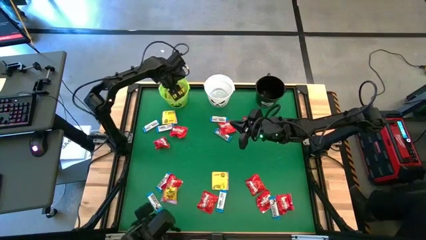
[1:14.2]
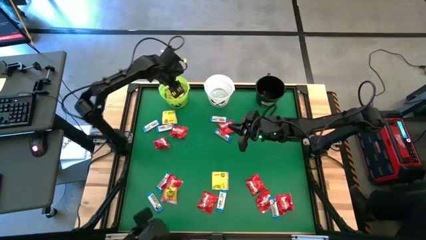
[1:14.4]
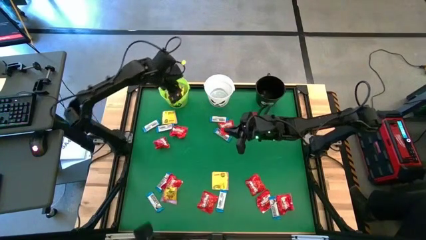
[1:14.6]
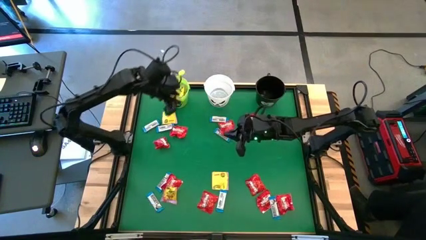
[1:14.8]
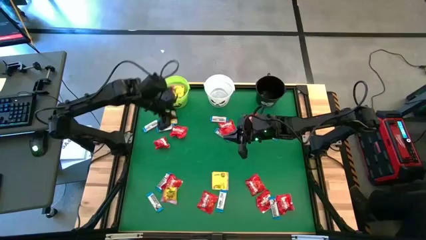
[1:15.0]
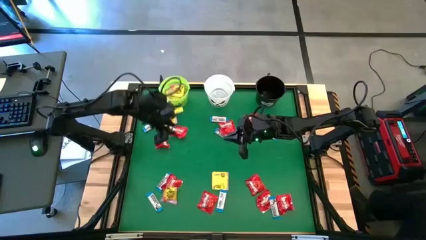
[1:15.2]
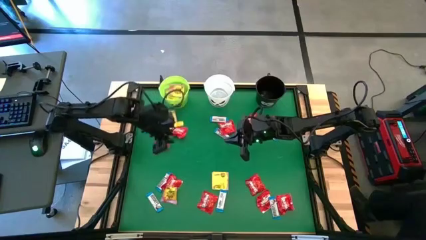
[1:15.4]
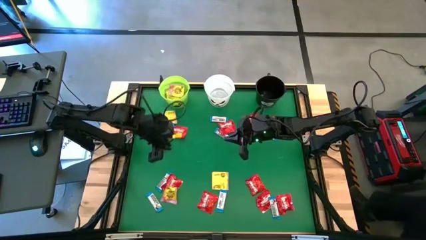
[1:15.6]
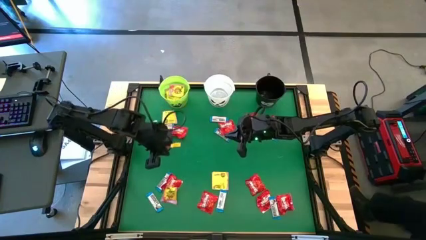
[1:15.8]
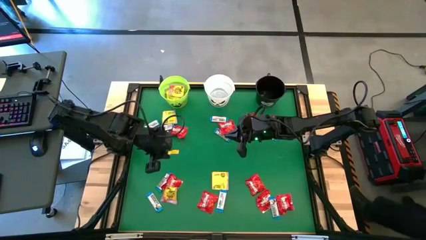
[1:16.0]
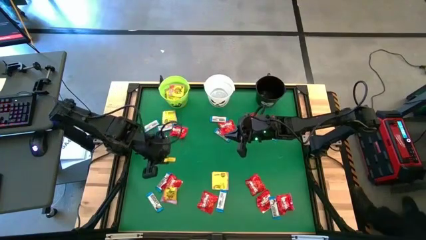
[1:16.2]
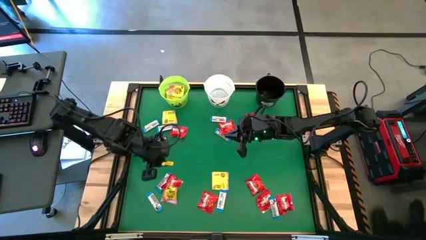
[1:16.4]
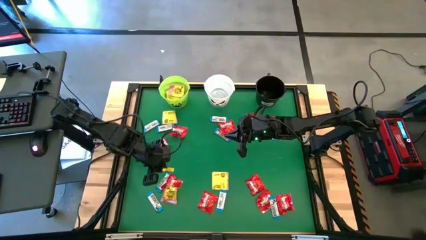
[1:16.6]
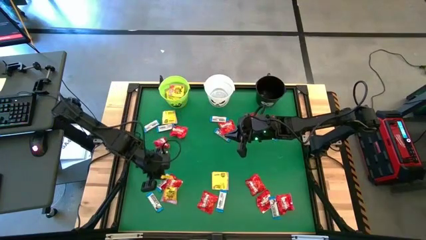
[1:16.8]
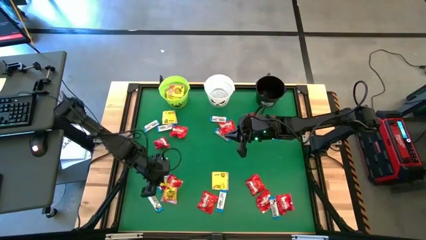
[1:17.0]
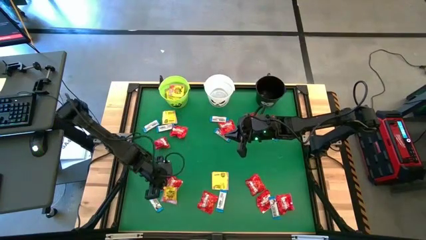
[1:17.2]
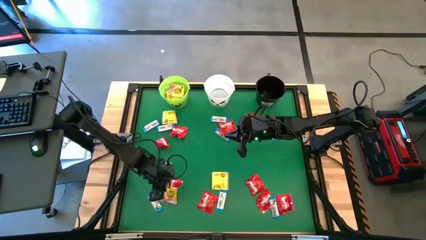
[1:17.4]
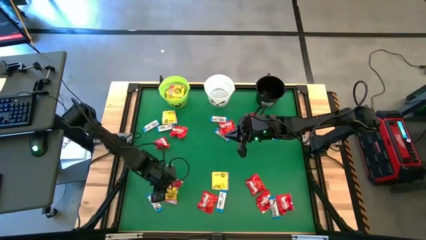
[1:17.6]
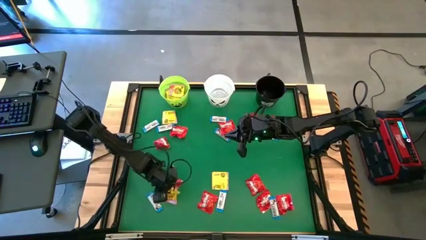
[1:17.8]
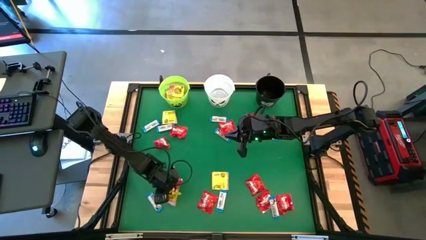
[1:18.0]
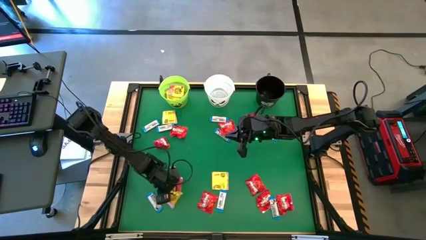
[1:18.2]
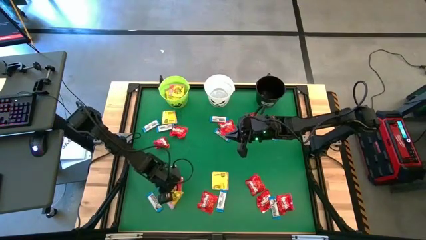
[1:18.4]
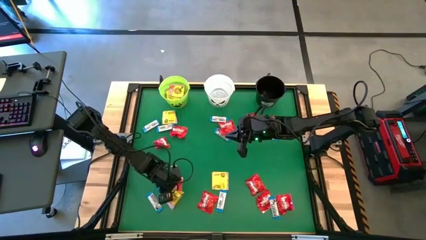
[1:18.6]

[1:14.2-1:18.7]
Task: Sort candy by brand, put in halloween buckets
Put the yellow candy into the green bucket

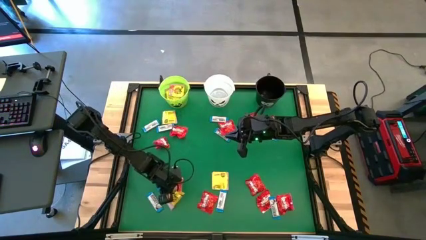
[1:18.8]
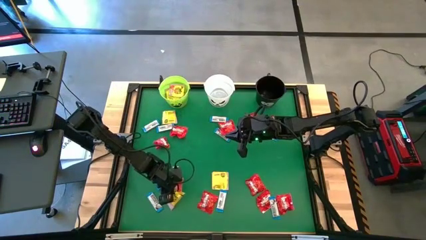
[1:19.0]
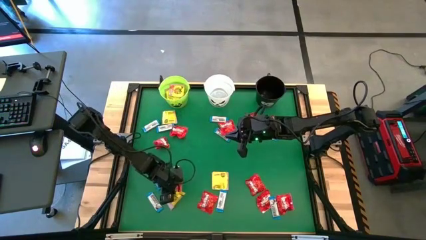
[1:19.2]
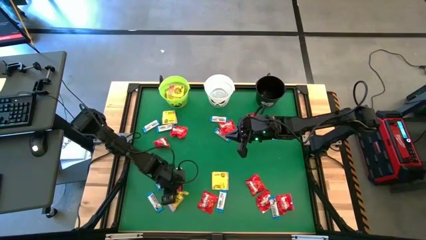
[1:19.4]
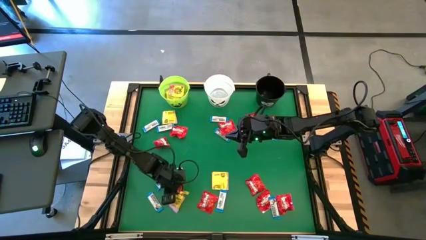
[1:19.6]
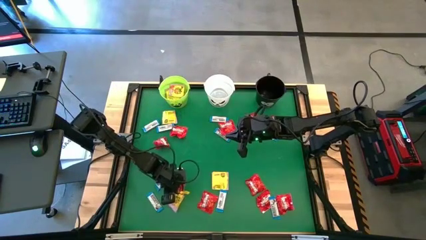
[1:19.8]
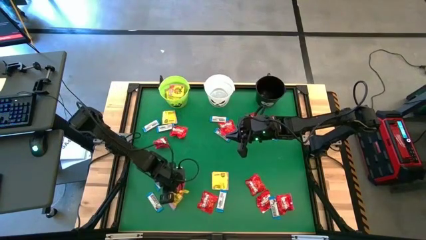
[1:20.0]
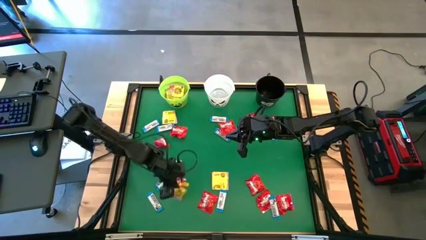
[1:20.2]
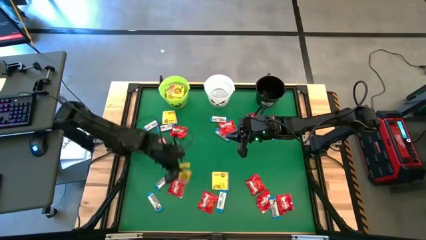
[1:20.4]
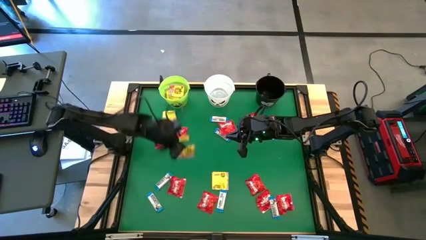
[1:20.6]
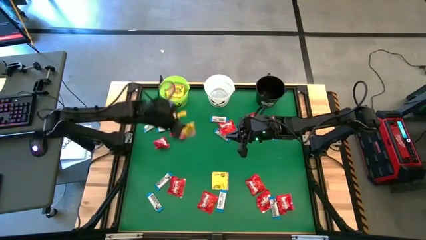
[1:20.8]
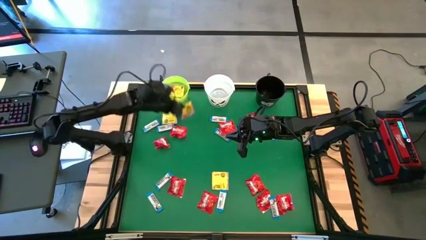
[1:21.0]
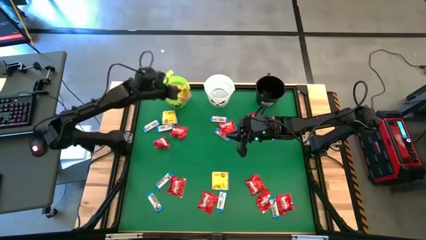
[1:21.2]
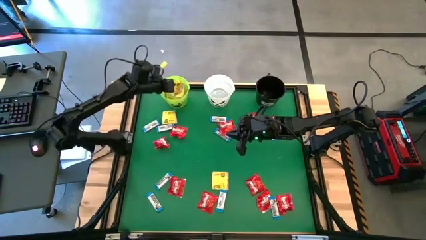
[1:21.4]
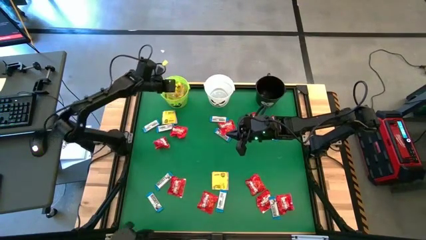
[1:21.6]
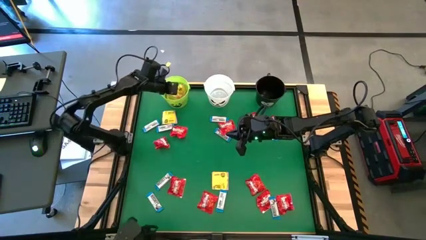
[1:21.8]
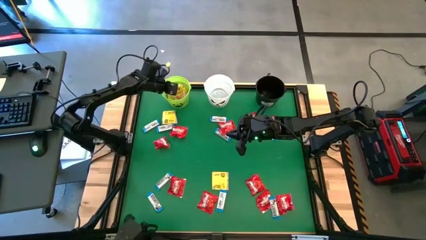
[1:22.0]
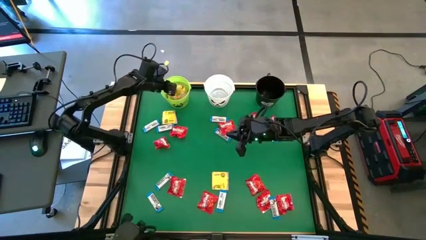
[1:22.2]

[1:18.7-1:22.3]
Put the yellow candy into the green bucket

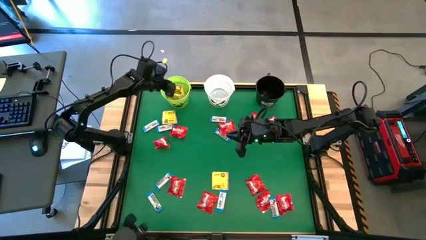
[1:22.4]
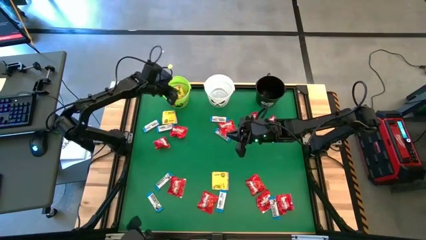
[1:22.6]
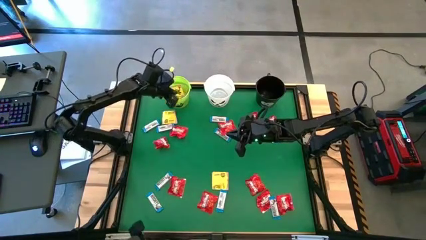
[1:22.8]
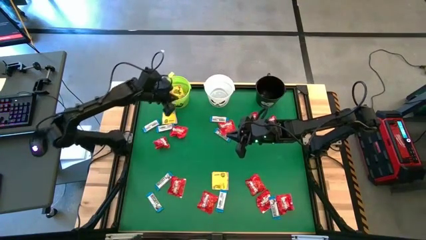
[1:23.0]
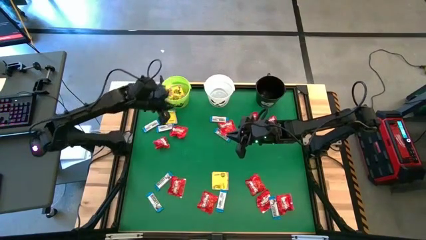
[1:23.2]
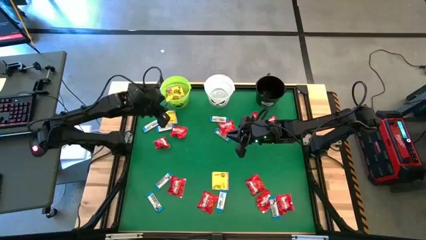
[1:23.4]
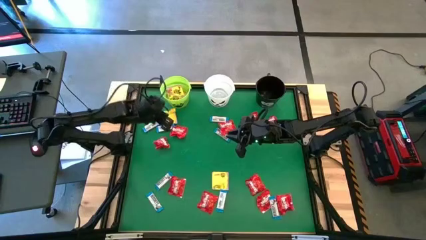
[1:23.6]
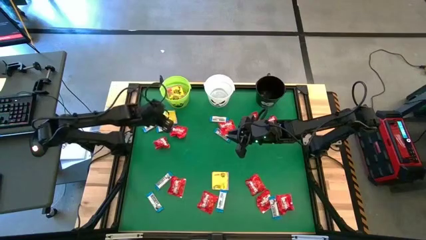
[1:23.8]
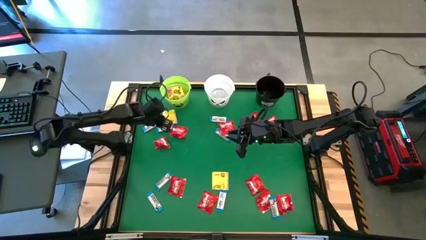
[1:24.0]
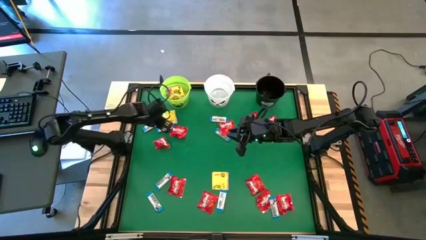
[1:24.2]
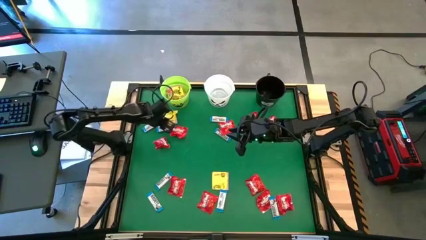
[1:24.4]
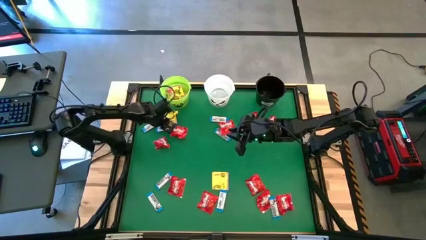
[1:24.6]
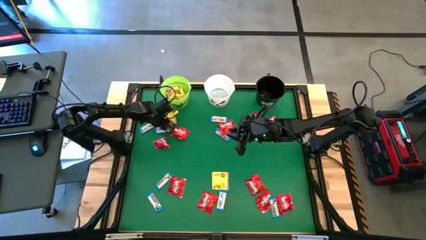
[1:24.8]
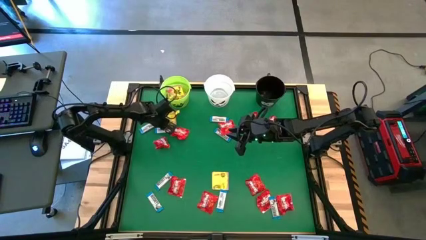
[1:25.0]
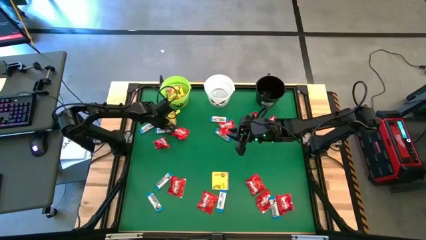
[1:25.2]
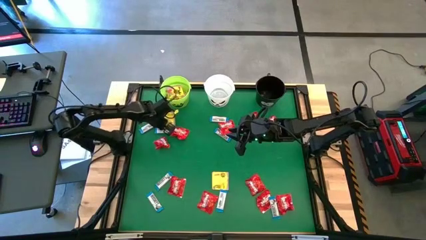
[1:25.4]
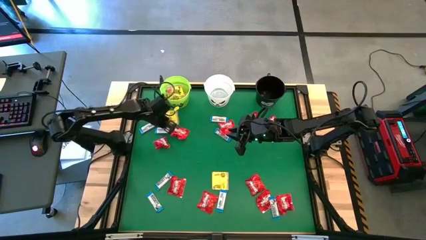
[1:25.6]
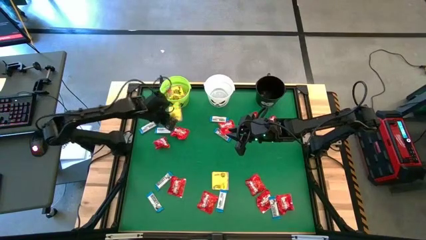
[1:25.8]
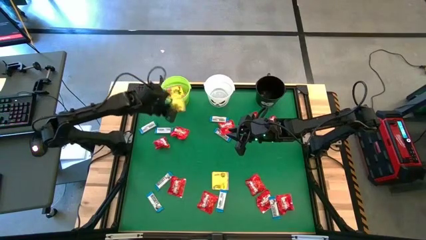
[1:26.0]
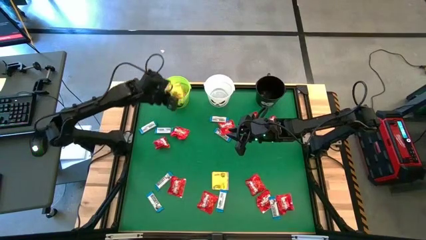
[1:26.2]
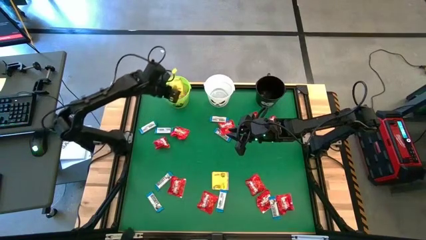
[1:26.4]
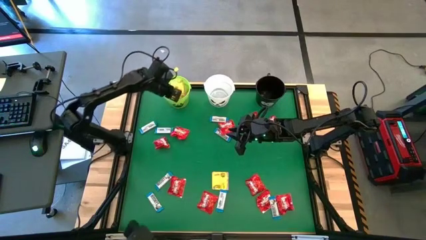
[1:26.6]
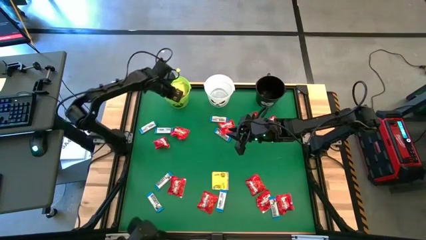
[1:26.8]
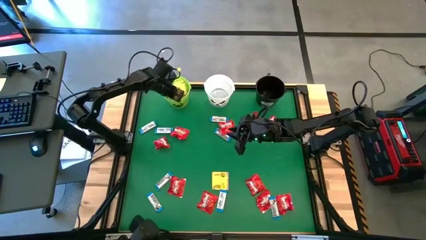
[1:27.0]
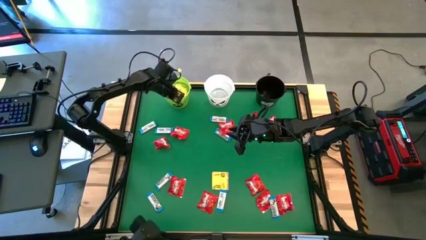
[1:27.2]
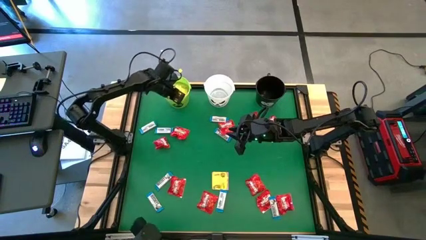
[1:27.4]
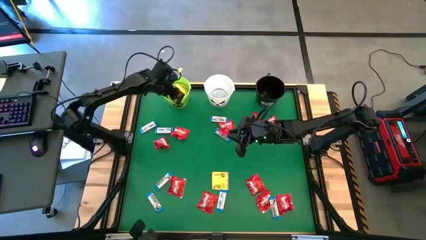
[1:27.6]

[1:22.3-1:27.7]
Put the yellow candy into the green bucket

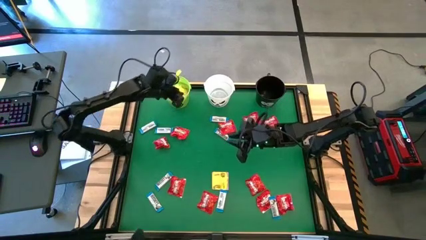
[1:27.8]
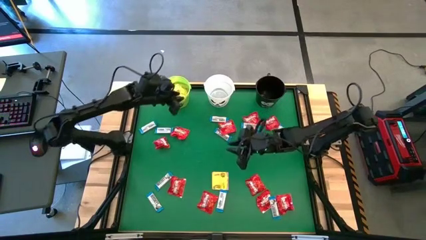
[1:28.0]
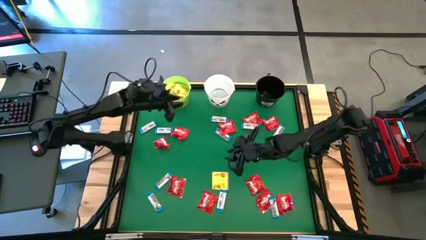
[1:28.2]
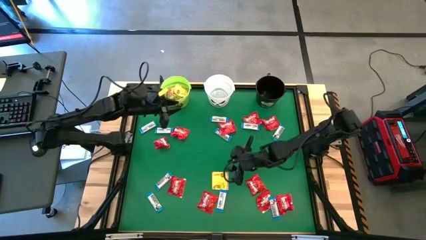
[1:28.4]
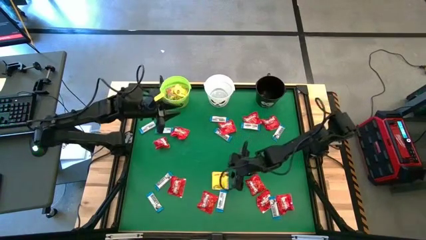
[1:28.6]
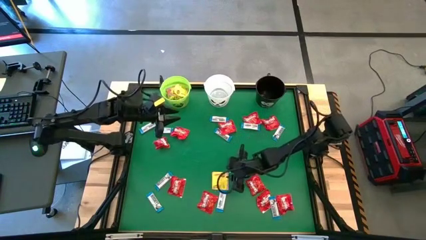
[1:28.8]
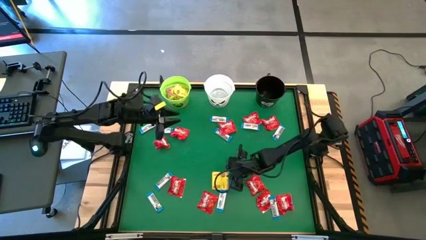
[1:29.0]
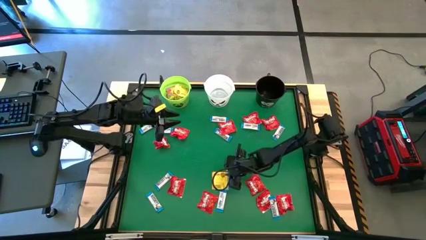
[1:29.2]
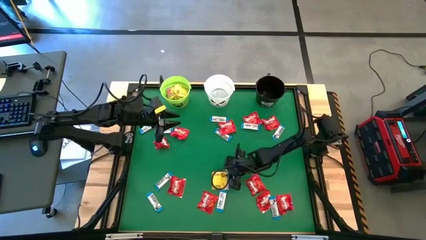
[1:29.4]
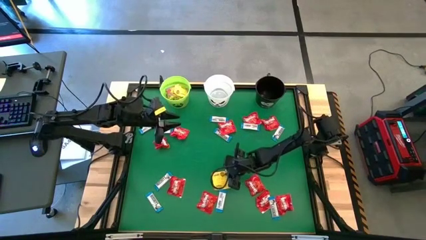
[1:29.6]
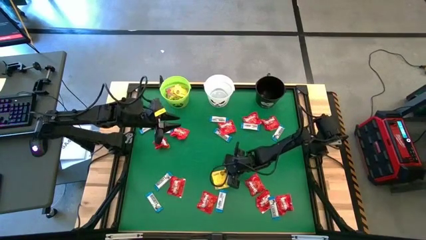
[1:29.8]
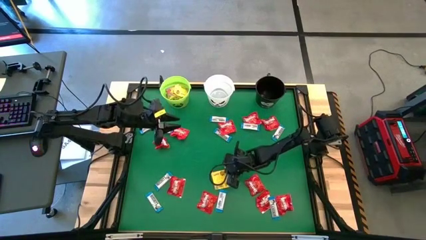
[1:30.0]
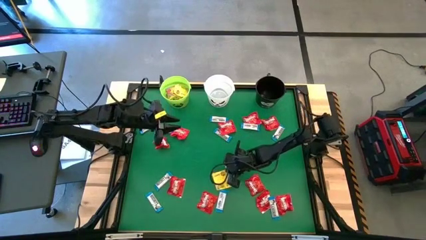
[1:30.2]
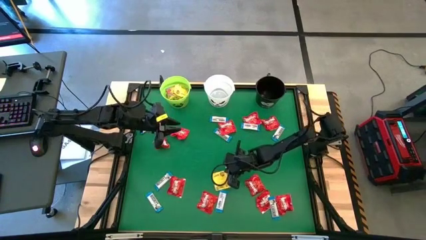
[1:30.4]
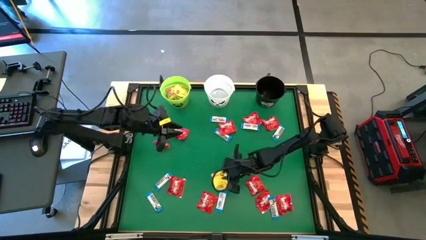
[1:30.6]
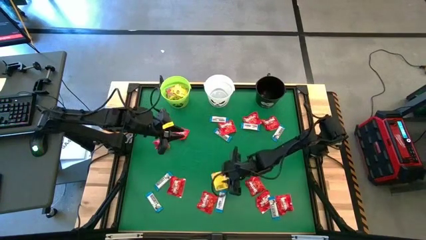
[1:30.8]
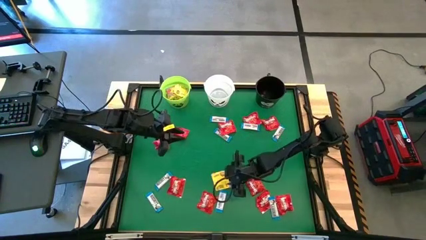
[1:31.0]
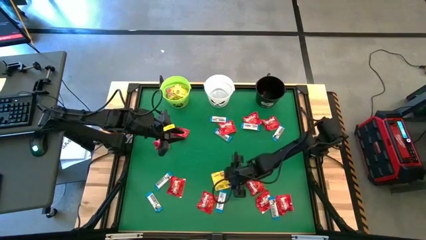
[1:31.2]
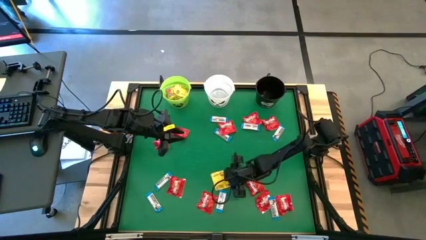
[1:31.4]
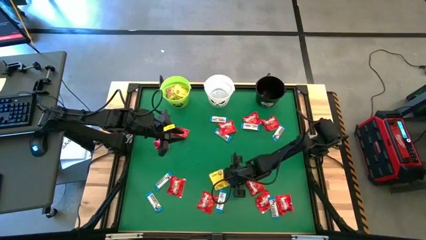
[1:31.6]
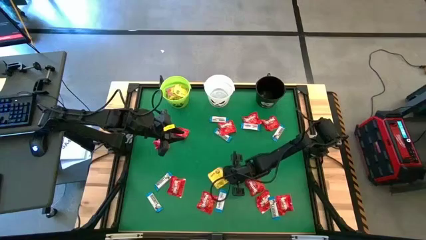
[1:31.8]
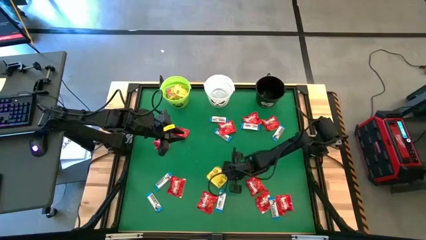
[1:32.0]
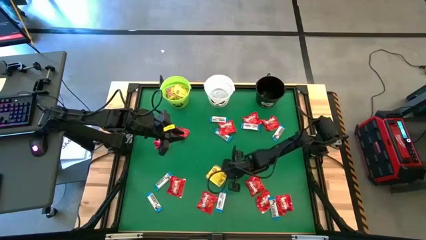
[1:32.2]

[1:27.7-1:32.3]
Put the yellow candy into the green bucket
